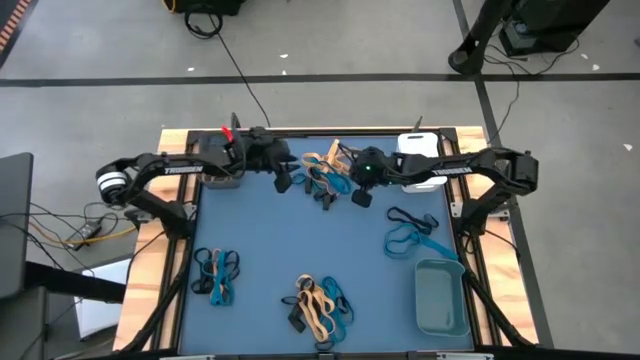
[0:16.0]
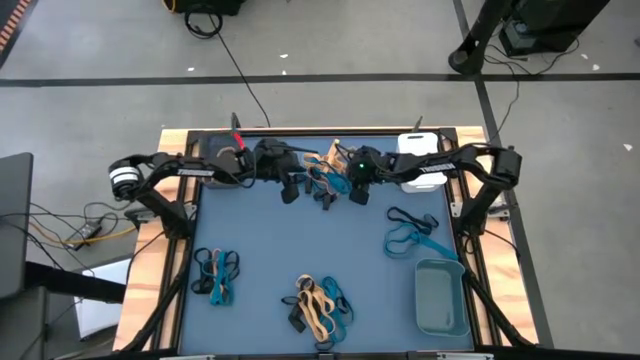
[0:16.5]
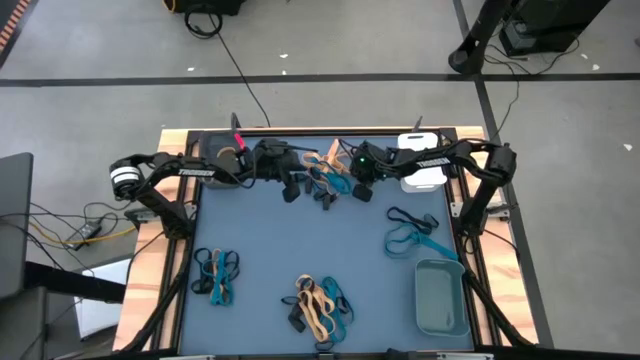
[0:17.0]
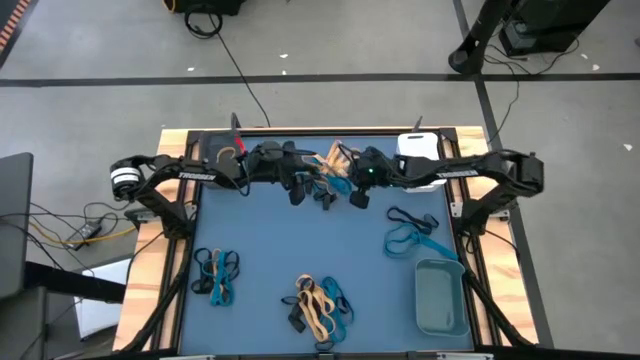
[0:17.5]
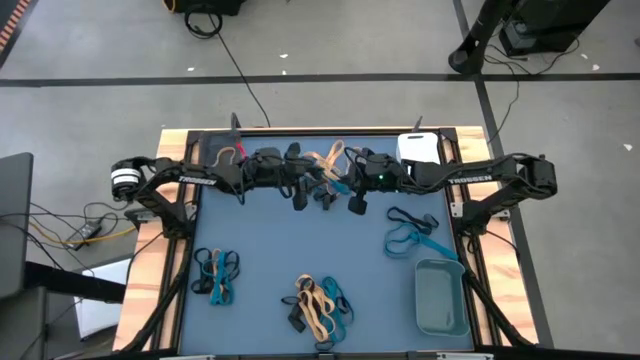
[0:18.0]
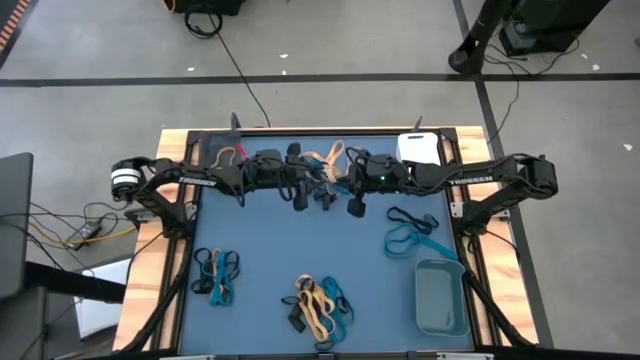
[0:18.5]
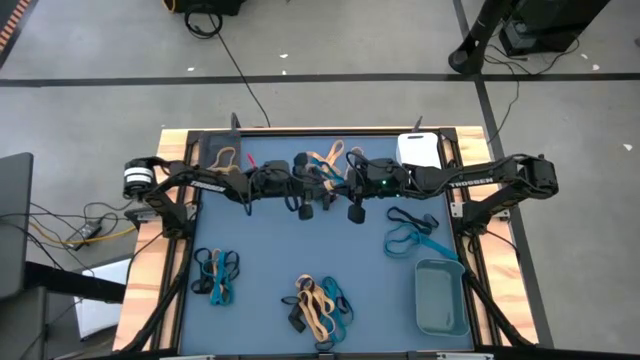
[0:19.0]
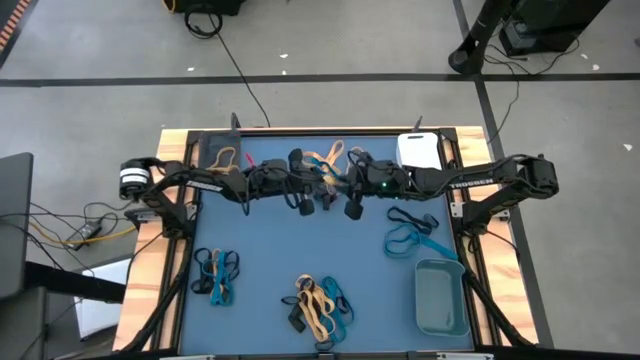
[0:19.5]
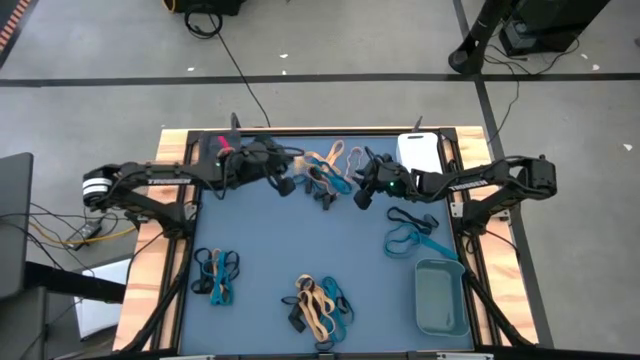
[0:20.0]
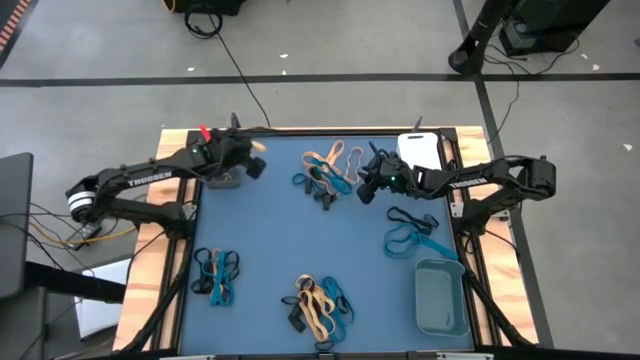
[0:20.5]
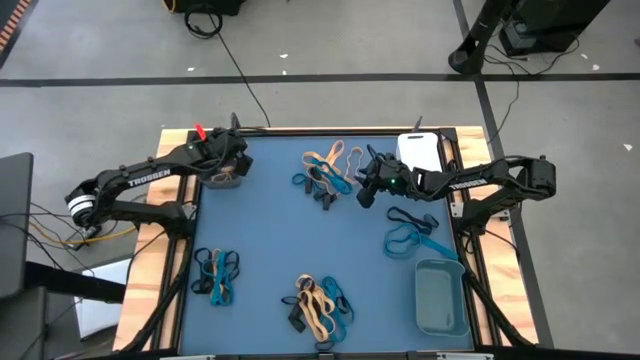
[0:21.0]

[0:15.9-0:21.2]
Task: Sort rubber bands into baskets
Put the yellow rubber band into the black bin

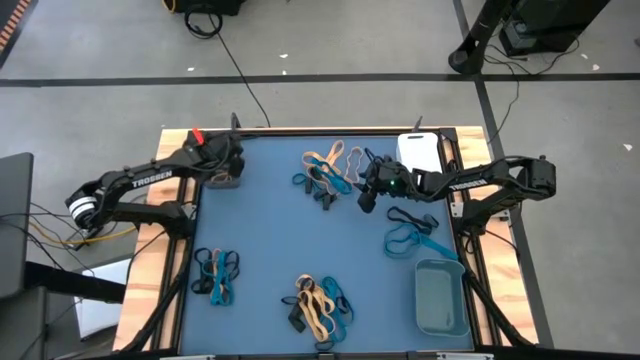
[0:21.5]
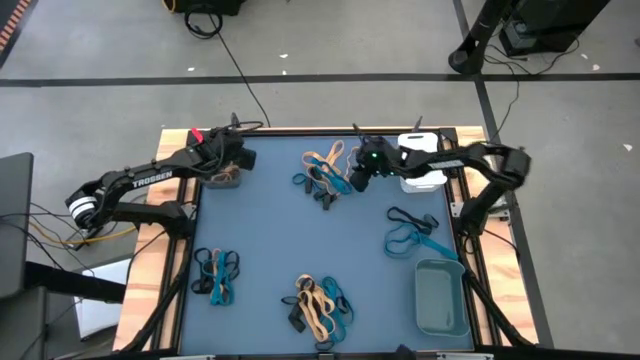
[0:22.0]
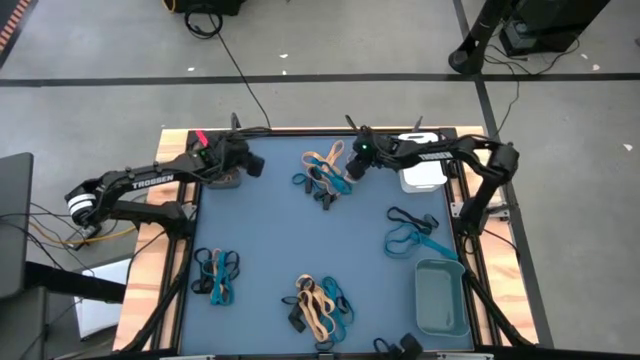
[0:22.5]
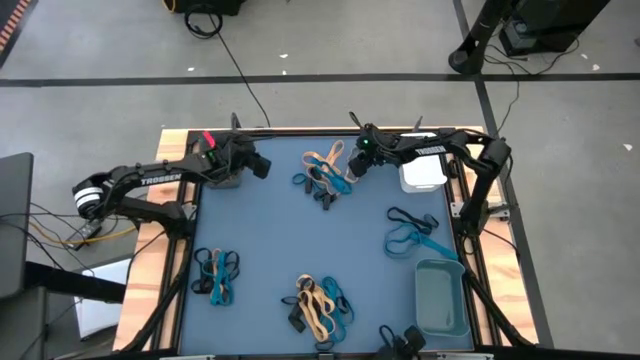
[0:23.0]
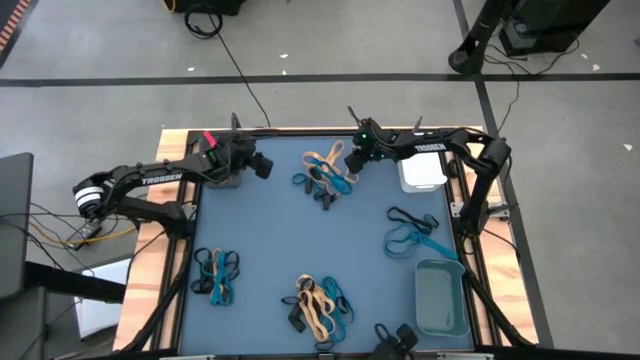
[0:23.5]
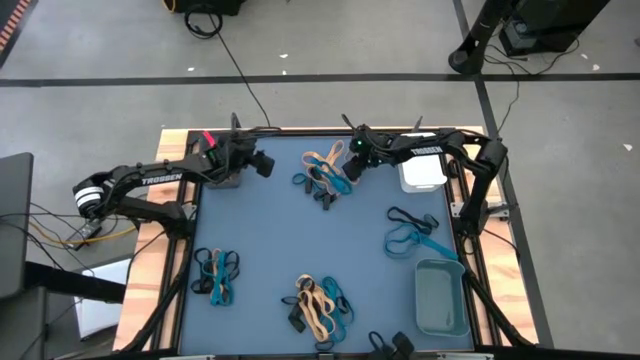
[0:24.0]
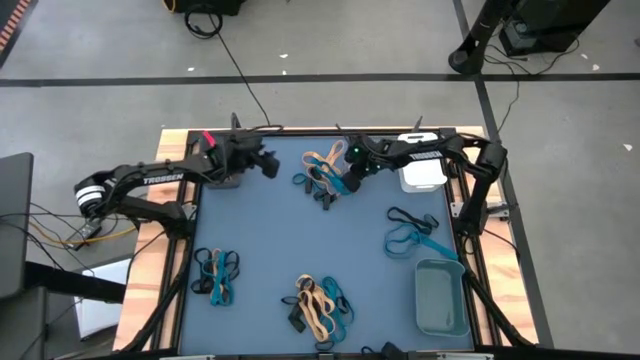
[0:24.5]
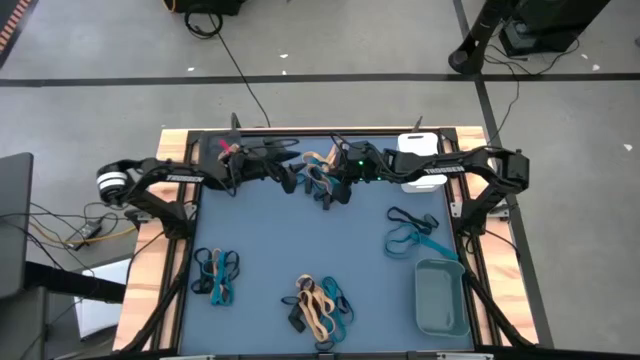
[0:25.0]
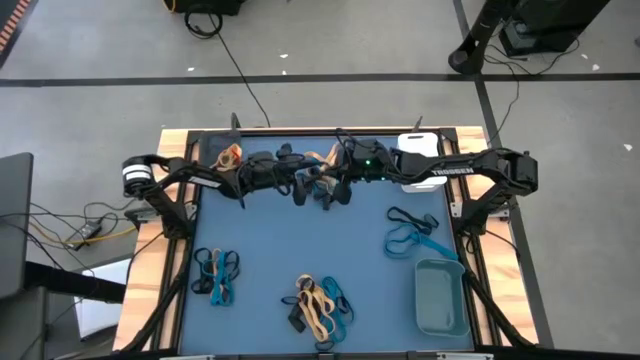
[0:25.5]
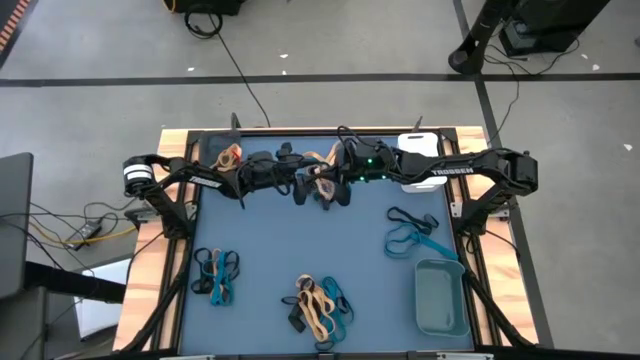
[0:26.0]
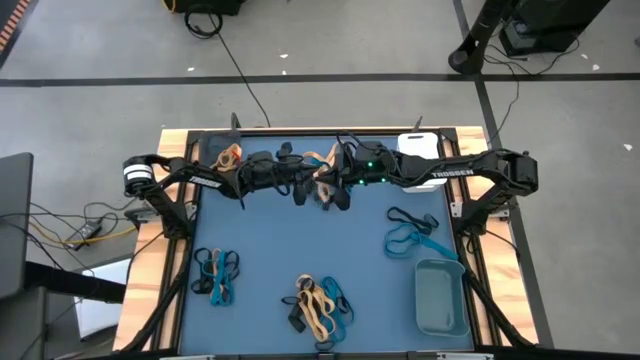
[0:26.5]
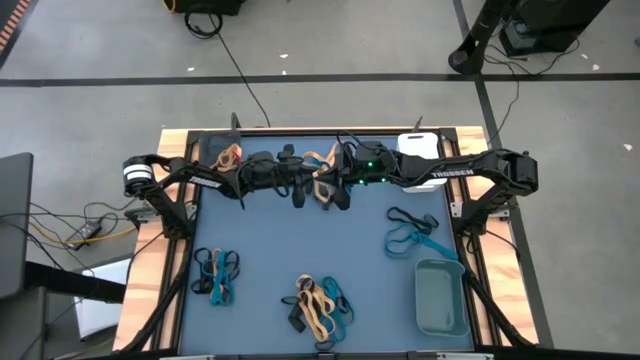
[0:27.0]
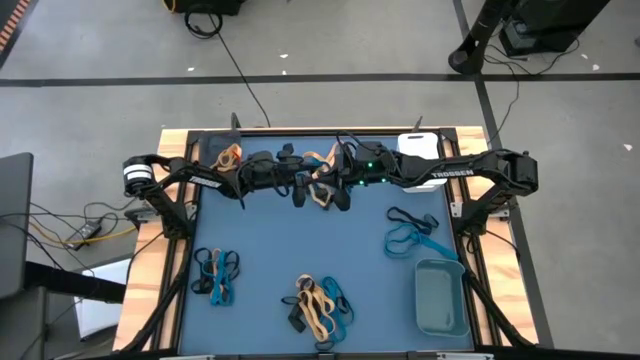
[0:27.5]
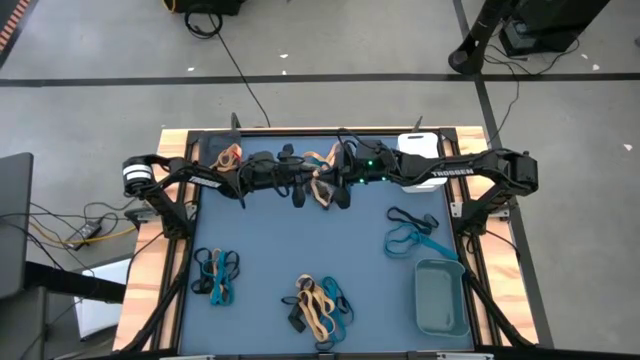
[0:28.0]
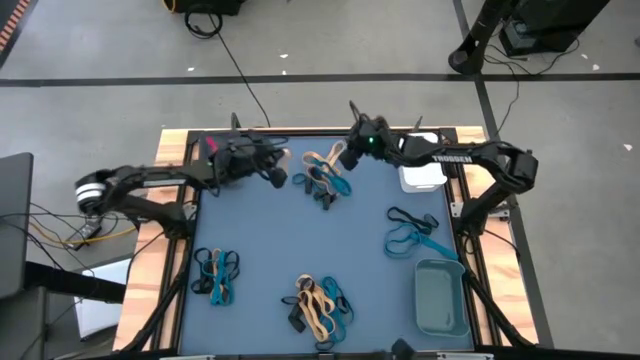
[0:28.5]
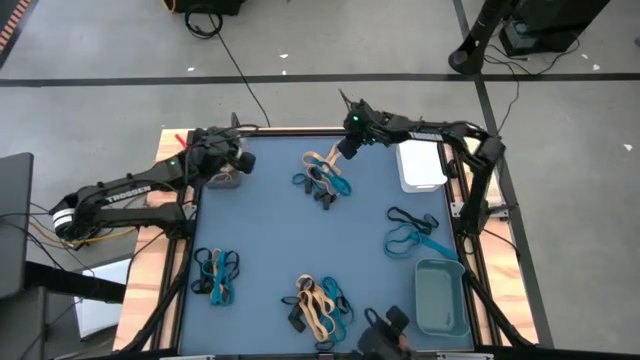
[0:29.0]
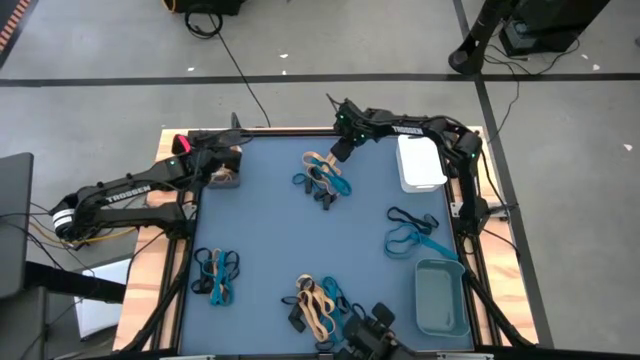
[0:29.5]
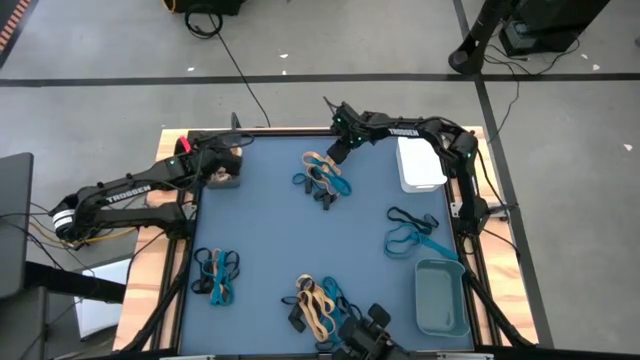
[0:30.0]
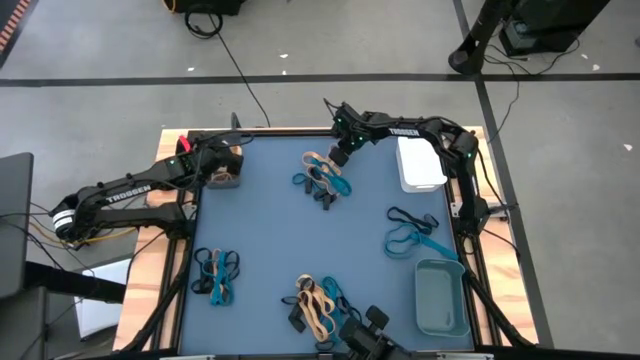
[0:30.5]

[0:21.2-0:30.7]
Put the yellow rubber band into the black bin

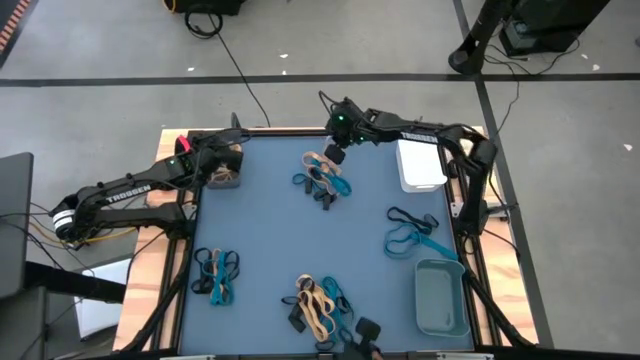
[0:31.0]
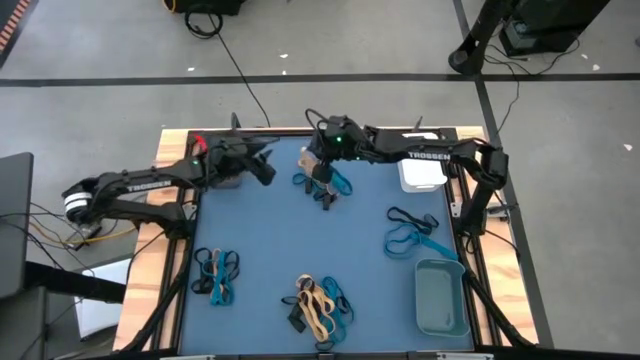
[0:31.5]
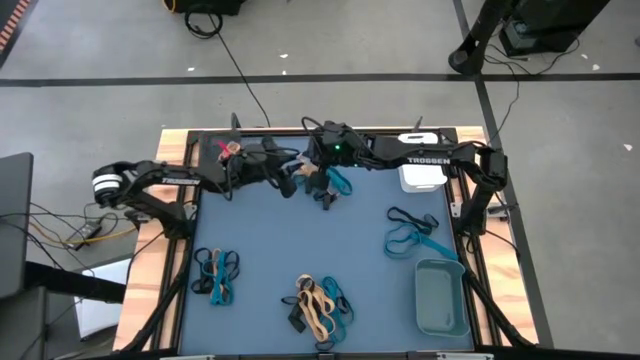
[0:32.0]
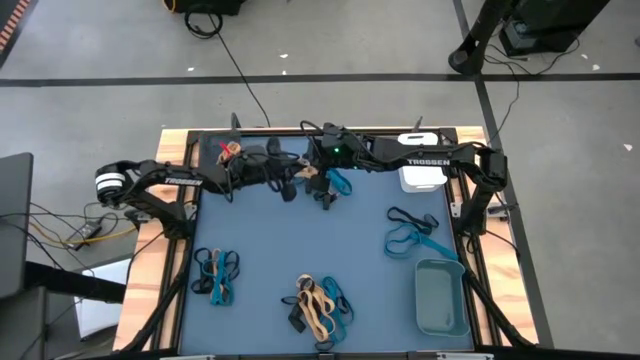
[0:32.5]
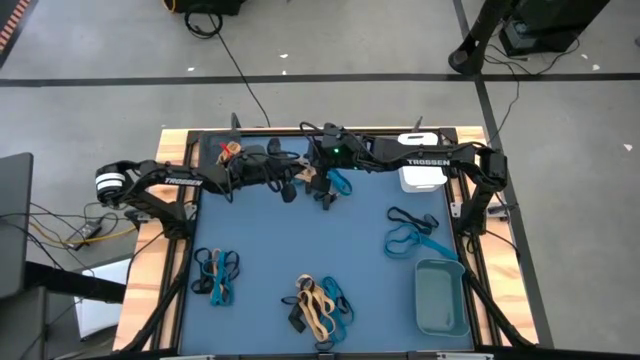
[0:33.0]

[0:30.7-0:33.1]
Put the yellow rubber band into the black bin

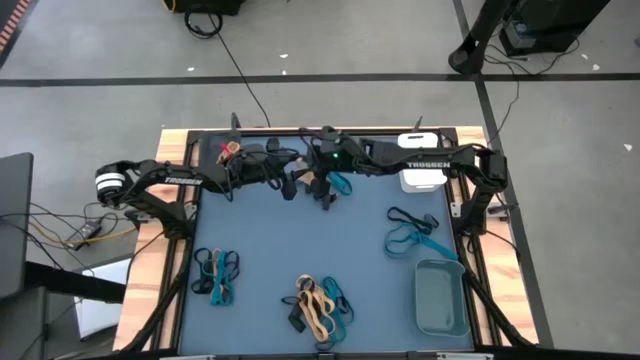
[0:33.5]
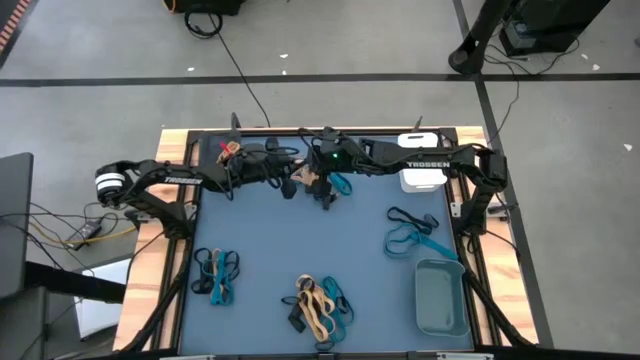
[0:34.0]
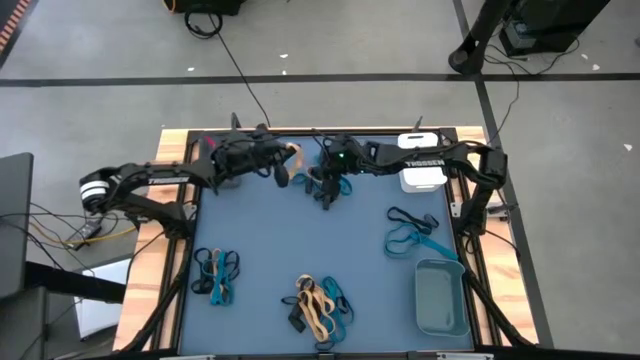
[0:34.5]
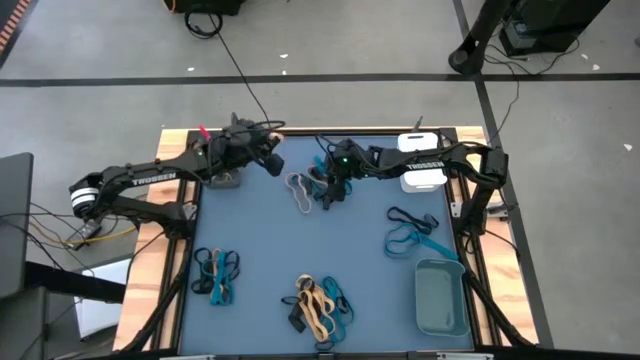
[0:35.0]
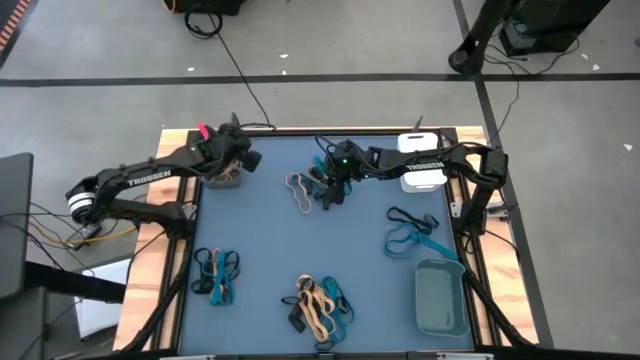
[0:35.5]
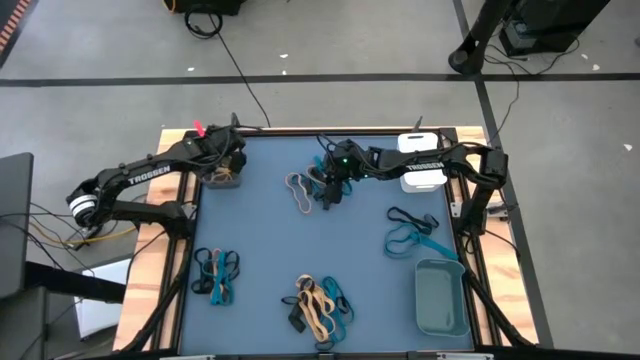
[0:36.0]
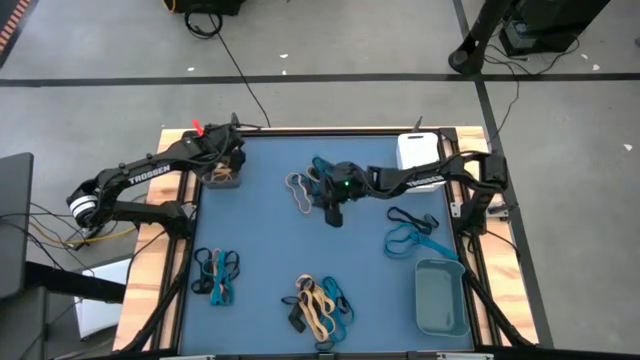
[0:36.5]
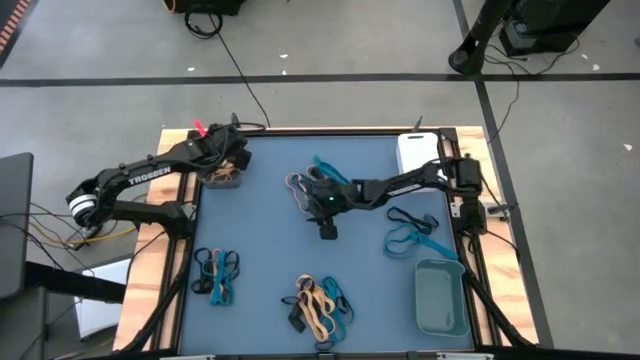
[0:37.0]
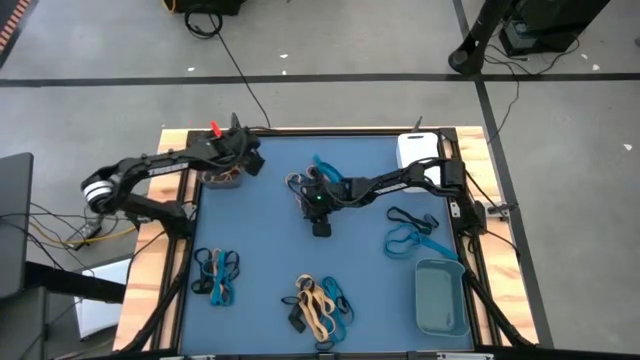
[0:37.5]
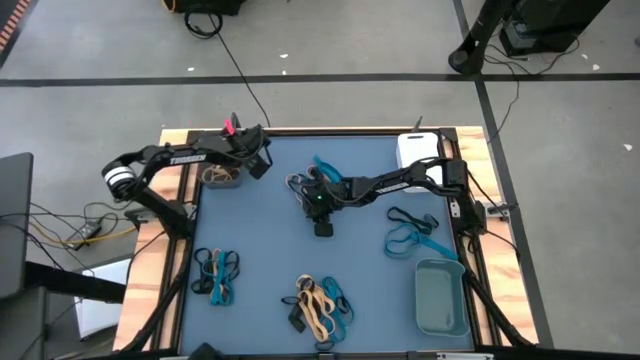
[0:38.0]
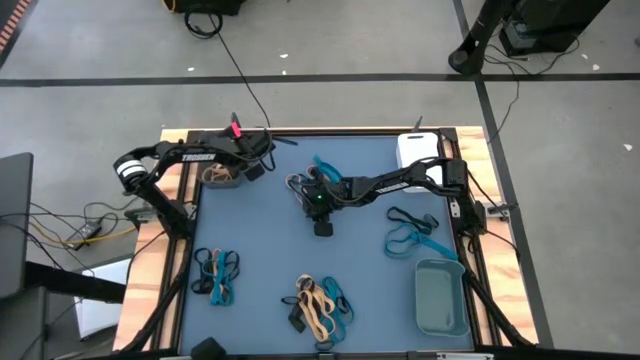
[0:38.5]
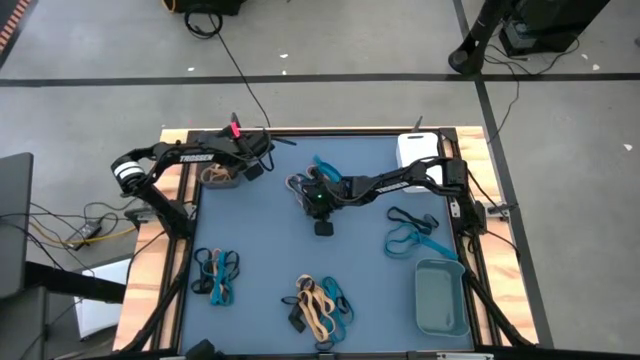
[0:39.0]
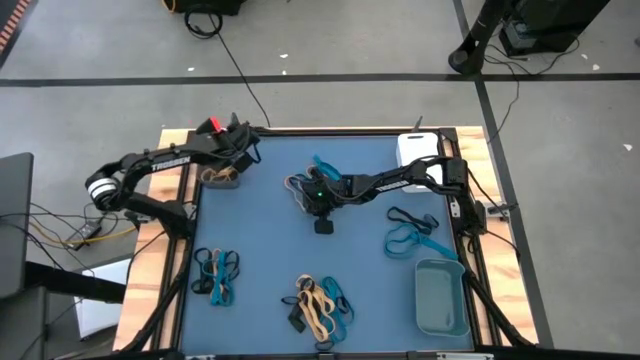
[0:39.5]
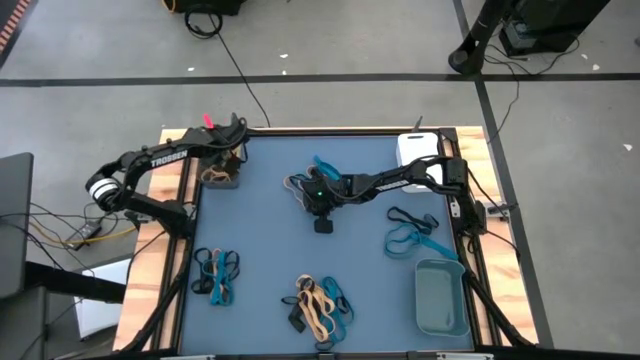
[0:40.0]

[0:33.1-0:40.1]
Put the yellow rubber band into the black bin
